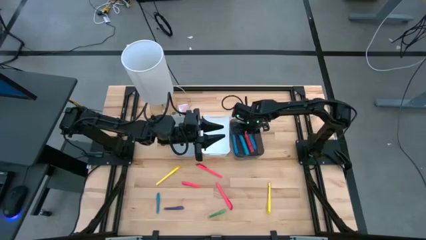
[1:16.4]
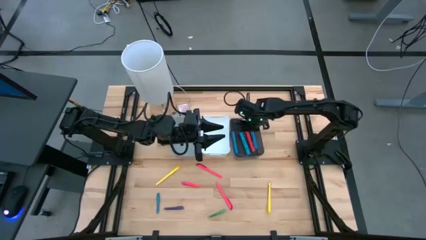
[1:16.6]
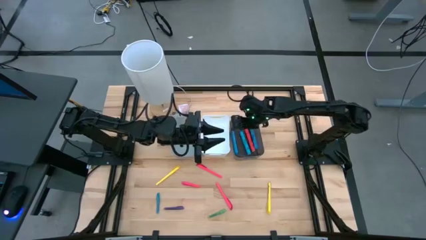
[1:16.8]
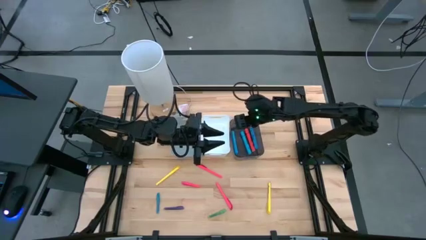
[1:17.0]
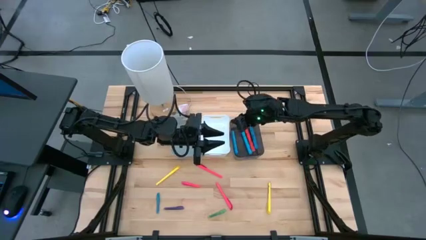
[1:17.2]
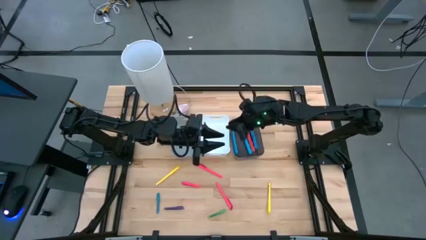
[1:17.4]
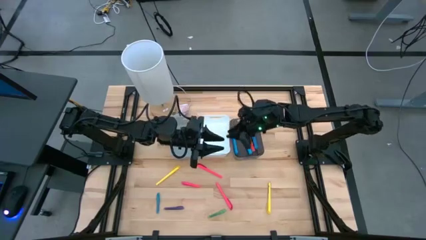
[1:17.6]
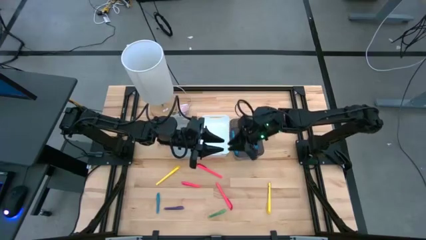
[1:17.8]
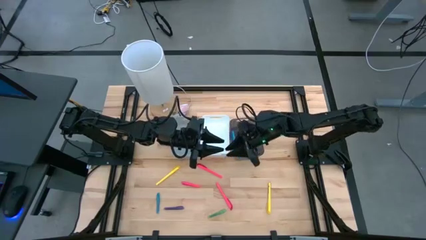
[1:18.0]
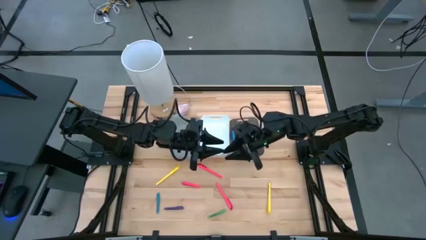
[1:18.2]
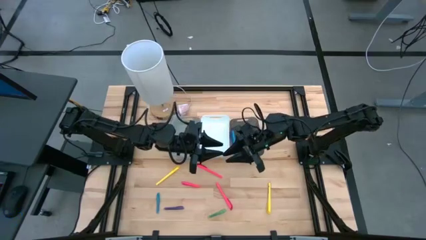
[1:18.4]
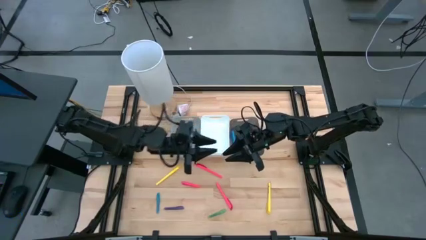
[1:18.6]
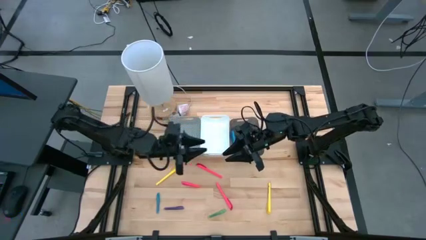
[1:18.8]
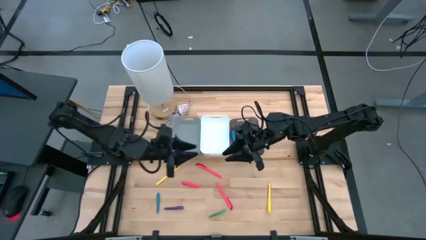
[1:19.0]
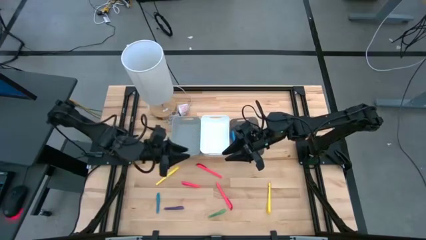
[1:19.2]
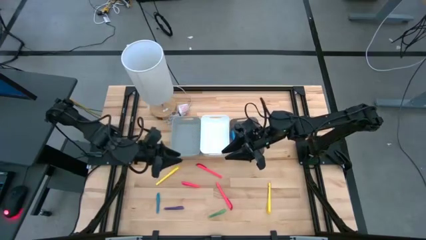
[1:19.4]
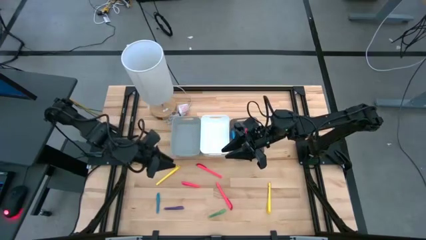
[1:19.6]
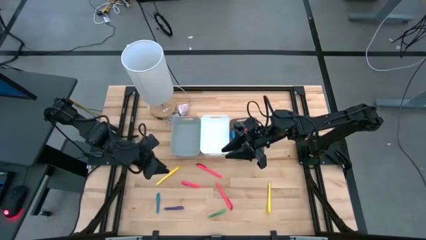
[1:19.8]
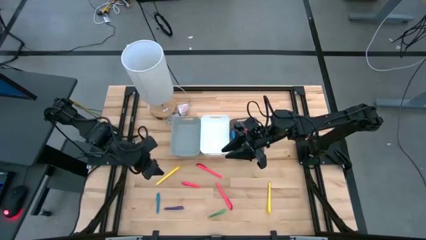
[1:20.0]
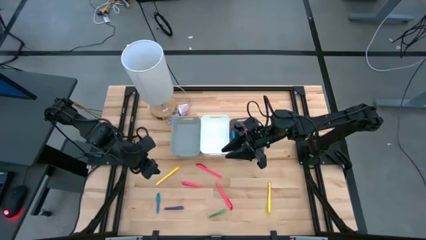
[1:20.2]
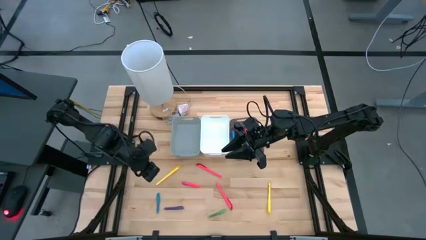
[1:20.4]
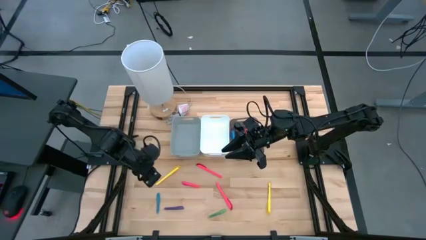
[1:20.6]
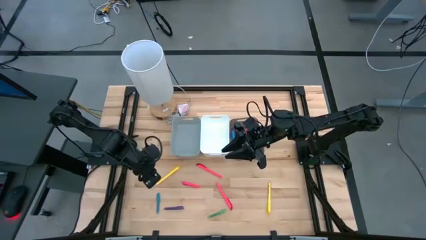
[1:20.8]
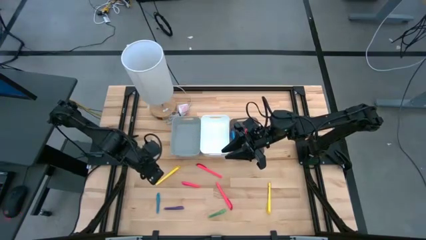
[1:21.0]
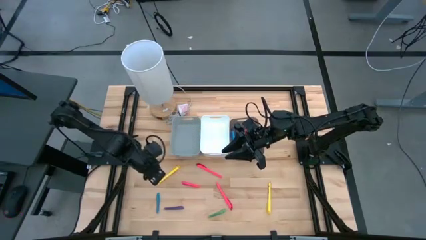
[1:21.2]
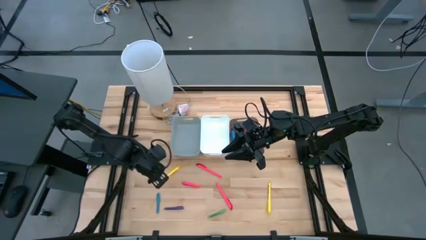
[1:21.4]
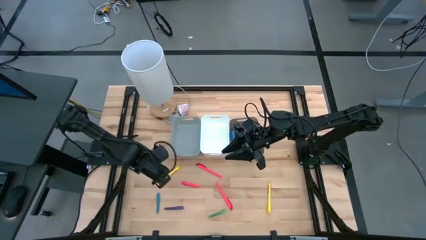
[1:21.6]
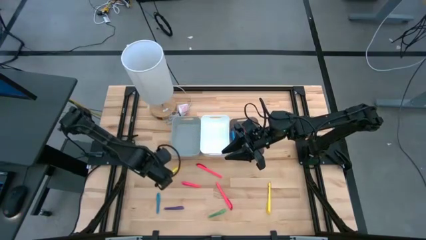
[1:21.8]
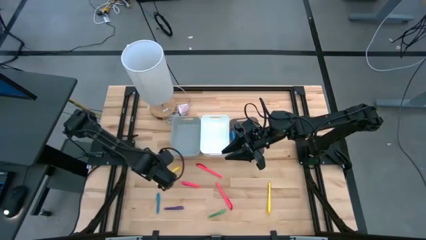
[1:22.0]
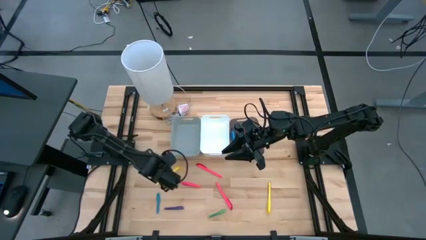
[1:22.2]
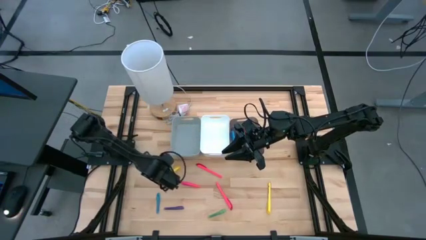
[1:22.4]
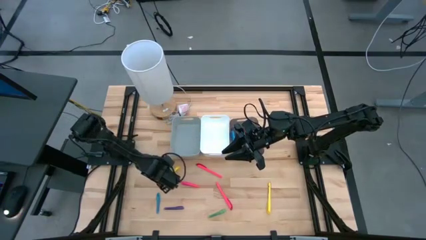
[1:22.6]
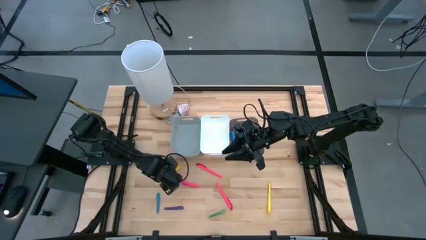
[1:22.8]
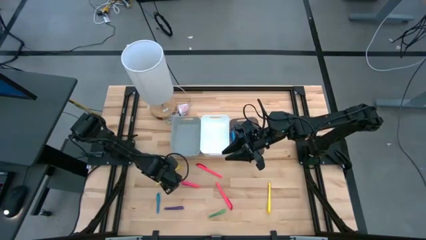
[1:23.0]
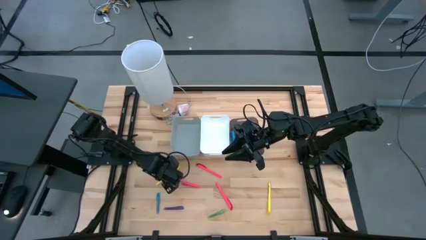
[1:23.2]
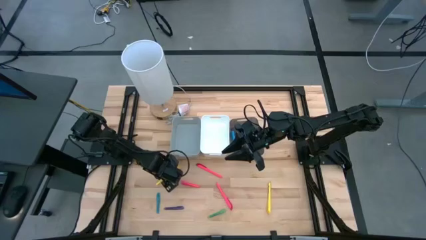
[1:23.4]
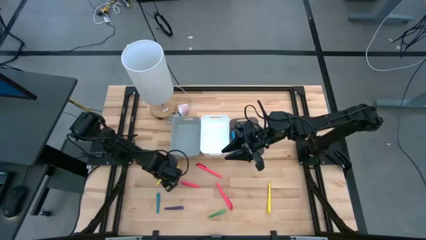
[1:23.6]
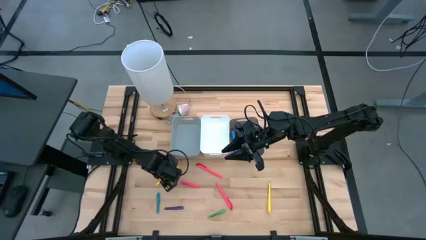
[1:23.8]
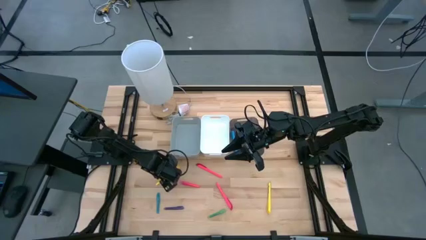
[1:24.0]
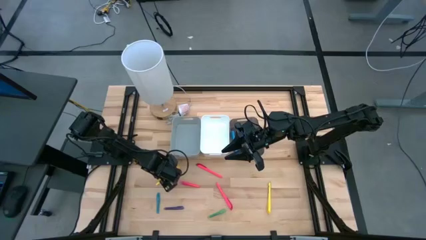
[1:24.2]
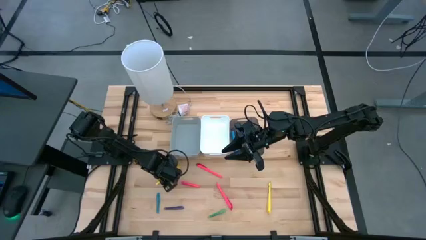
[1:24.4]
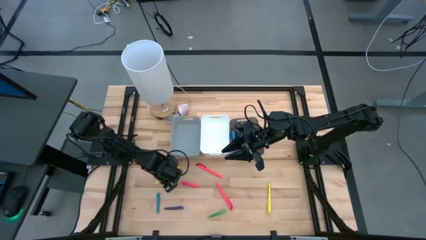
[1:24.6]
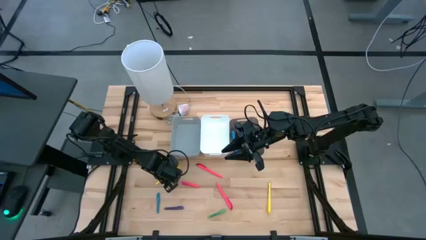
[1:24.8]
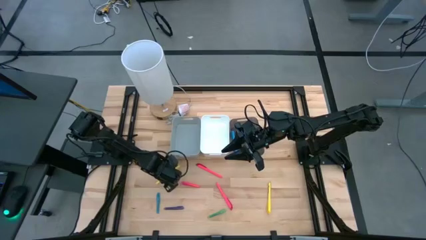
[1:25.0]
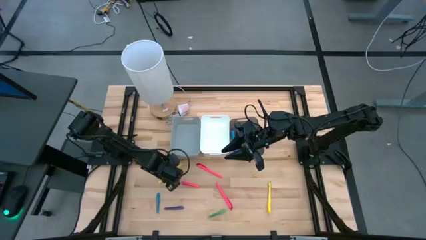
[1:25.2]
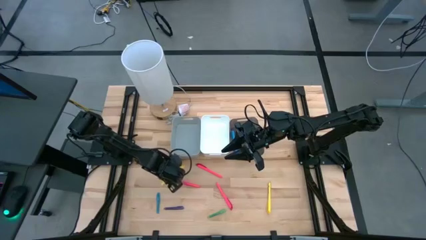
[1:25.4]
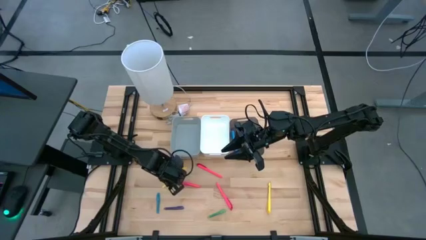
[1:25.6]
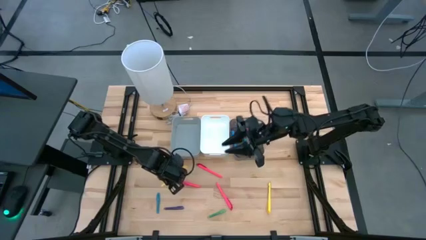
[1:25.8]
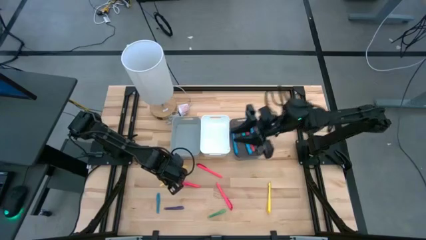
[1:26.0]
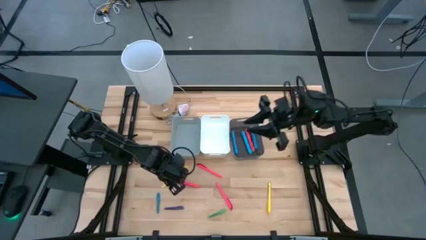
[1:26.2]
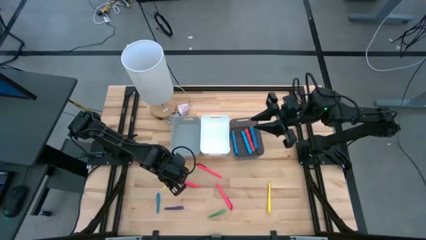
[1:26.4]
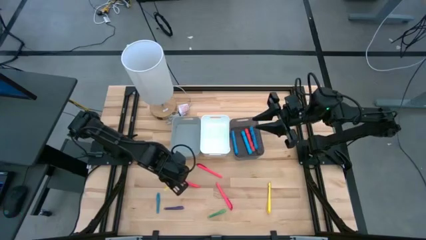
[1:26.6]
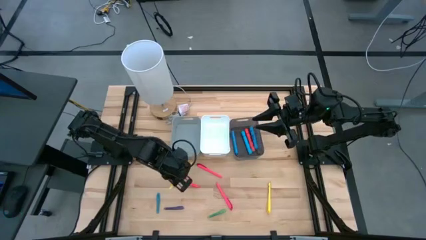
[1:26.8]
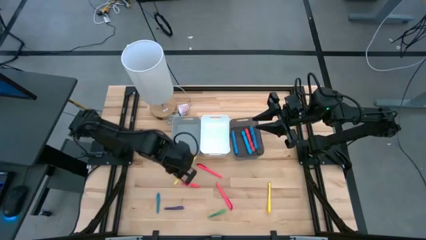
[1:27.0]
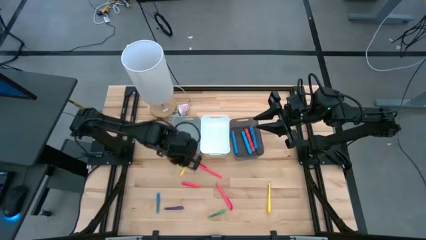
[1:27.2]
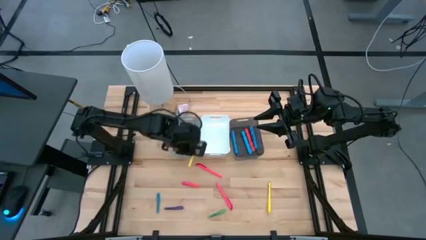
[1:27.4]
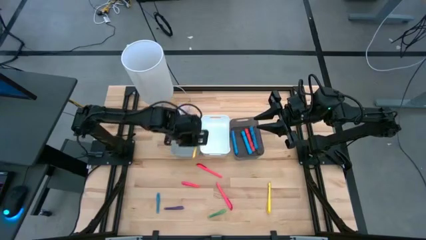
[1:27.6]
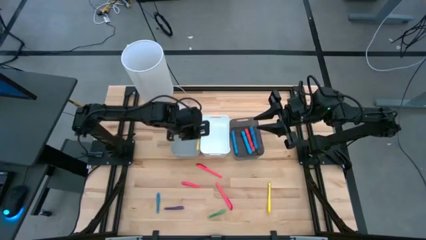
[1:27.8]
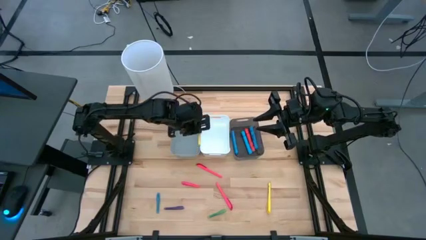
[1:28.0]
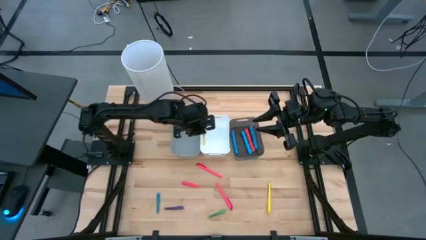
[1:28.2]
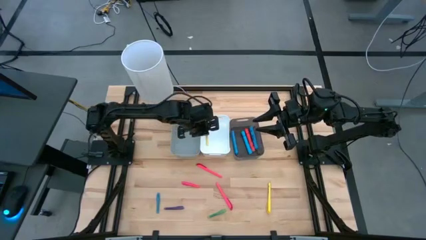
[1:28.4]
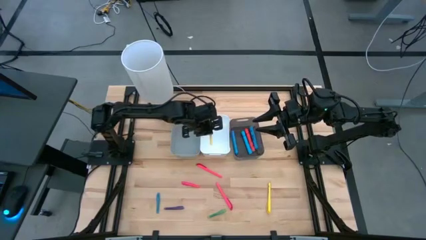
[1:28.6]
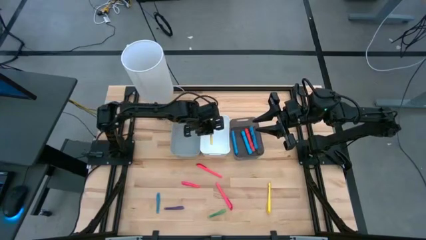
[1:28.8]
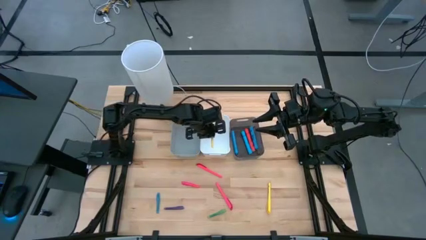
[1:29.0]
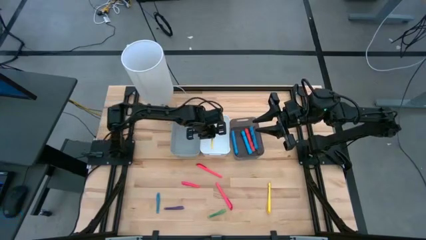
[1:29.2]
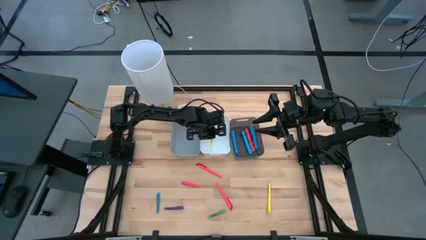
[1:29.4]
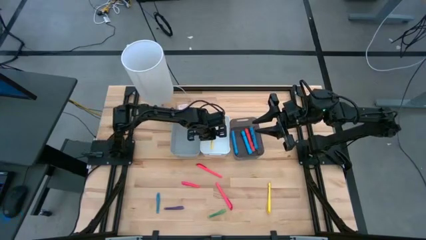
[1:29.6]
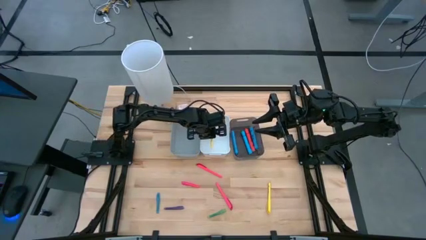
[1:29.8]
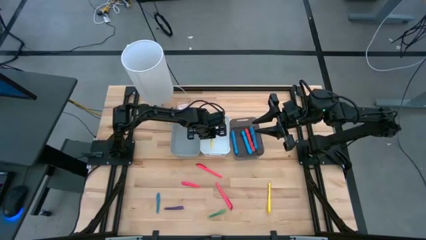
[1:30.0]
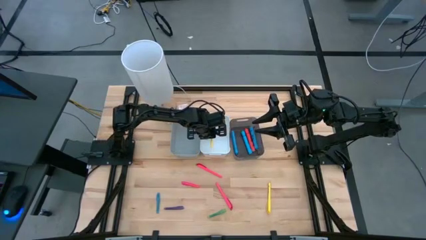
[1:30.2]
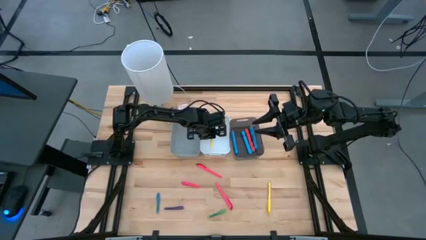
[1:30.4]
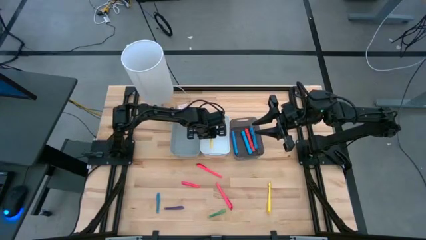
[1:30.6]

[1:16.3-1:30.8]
Task: Pick & Place Markers
Put the left yellow highlighter pen into the white bin

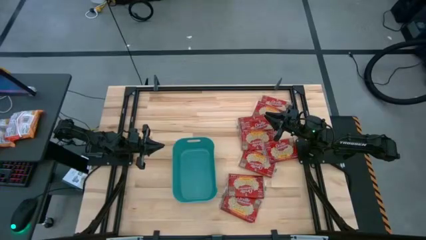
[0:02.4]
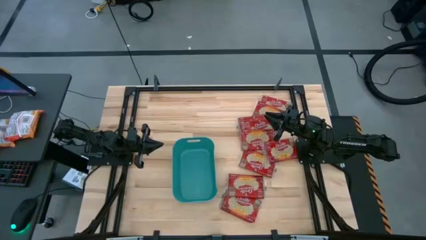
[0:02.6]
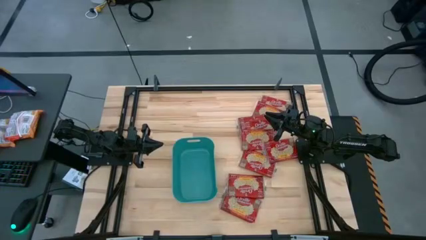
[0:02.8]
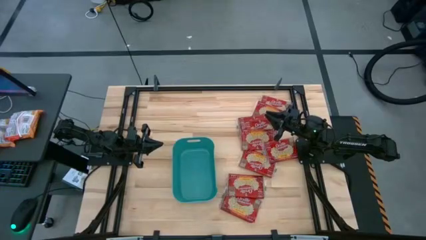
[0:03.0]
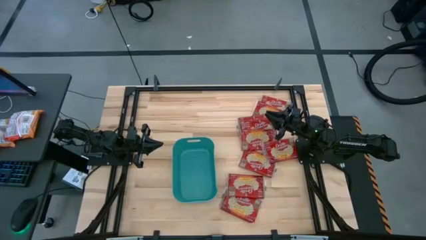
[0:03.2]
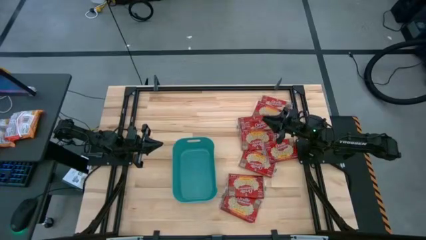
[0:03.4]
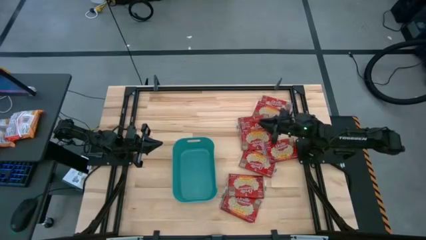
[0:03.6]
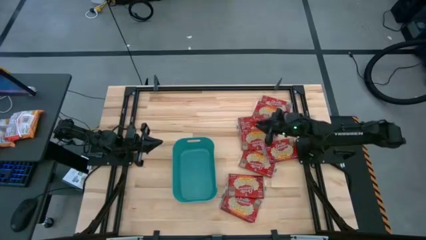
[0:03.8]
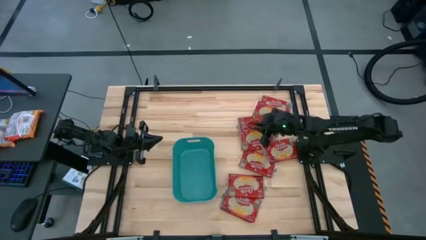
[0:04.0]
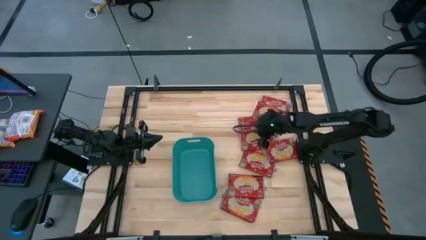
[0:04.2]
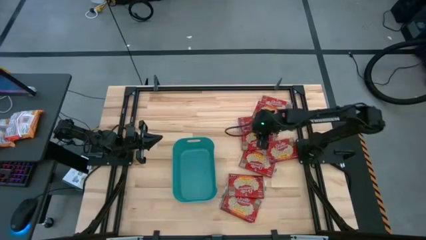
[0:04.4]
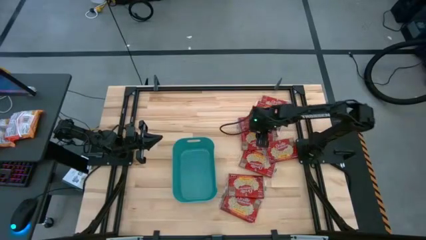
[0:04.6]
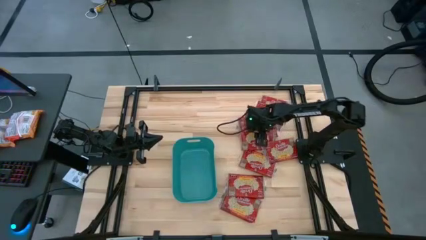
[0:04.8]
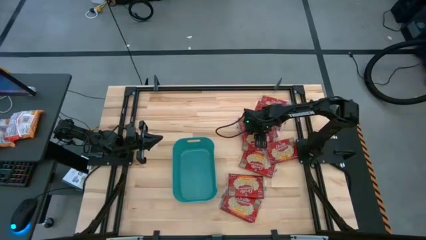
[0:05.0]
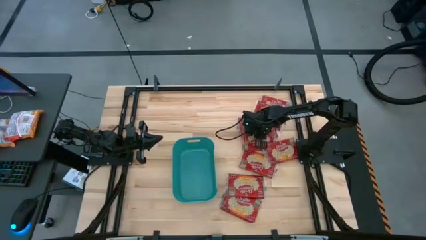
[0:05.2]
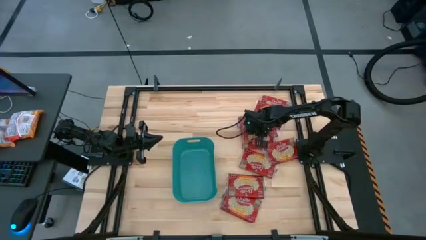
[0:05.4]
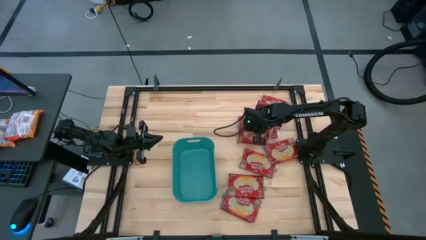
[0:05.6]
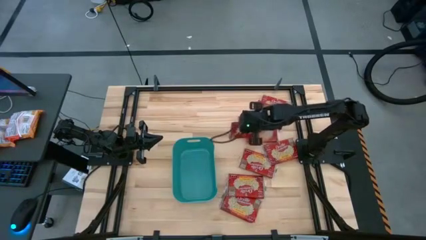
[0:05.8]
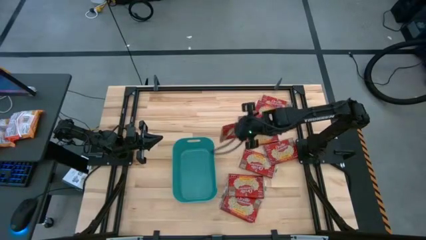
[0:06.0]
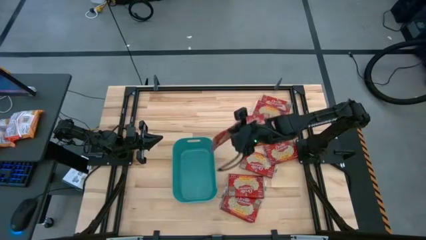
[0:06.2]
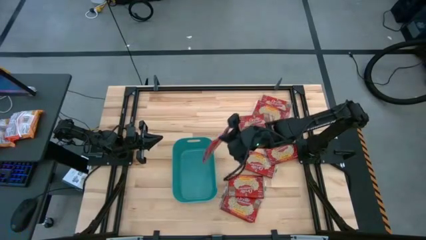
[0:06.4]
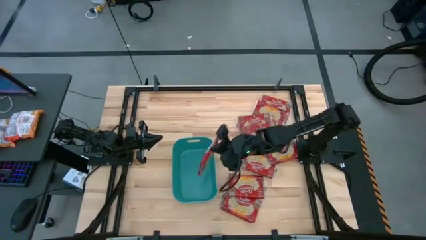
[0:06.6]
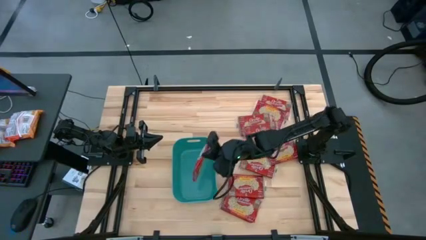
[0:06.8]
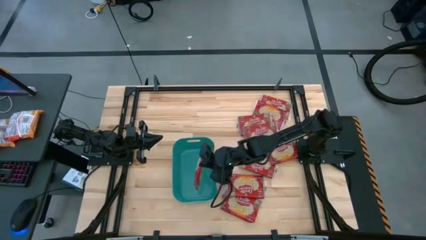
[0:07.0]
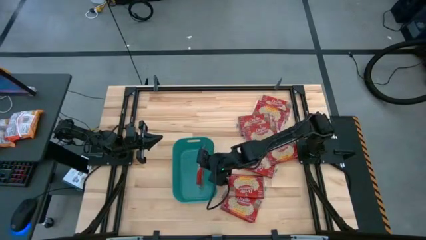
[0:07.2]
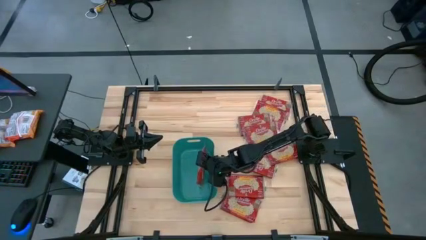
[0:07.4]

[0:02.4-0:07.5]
Task: Sort popcorn bags into baskets
Put the red popcorn bag into the green bin
